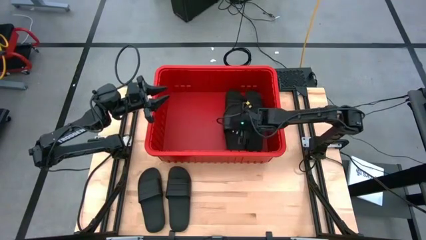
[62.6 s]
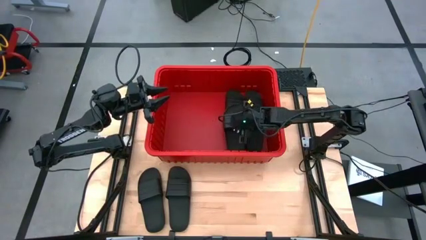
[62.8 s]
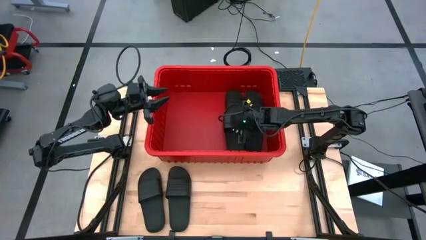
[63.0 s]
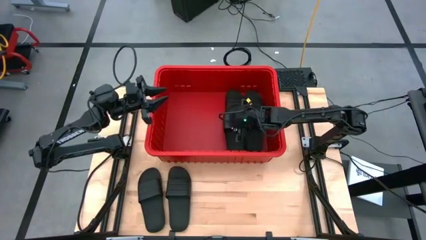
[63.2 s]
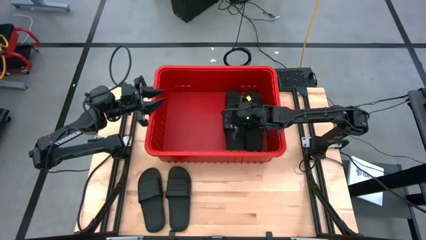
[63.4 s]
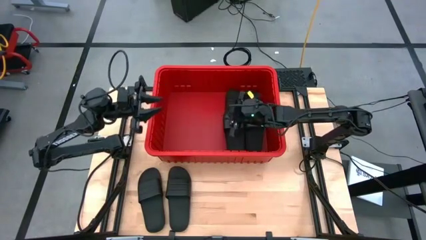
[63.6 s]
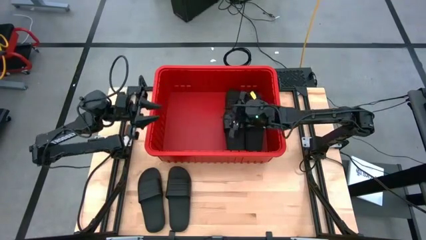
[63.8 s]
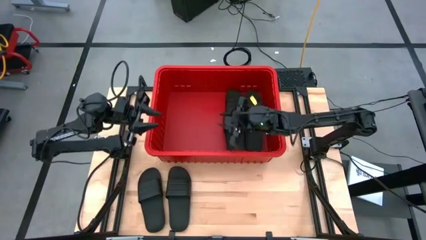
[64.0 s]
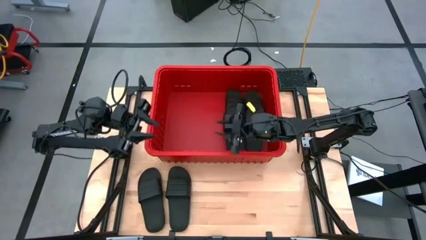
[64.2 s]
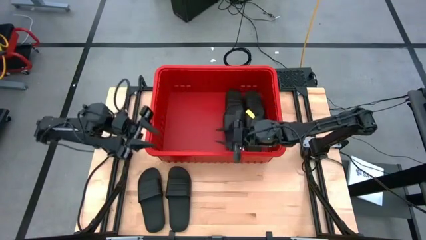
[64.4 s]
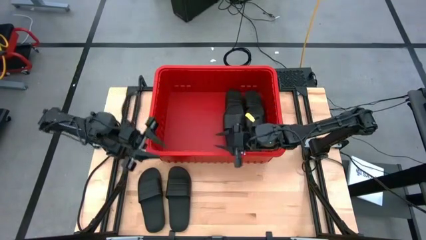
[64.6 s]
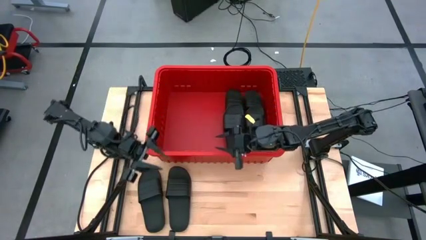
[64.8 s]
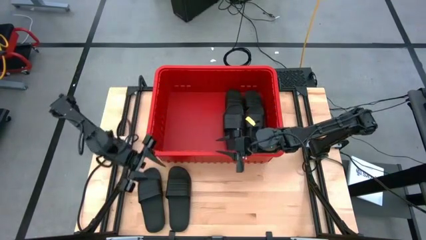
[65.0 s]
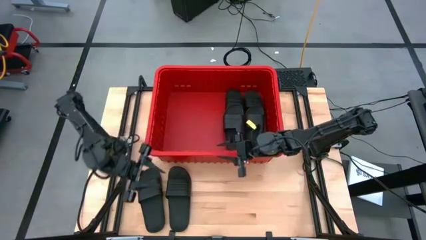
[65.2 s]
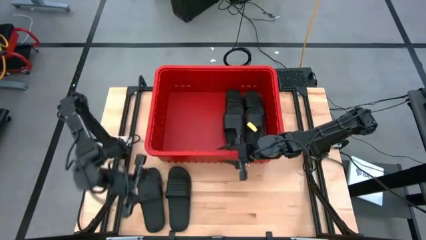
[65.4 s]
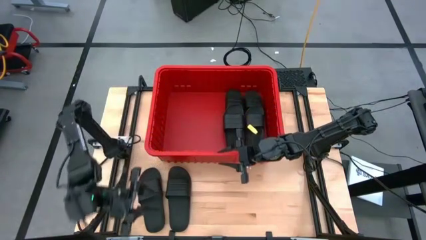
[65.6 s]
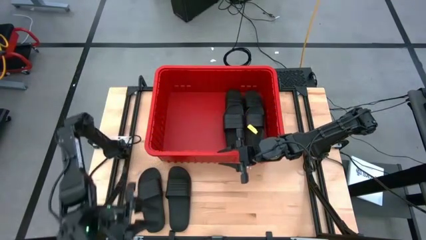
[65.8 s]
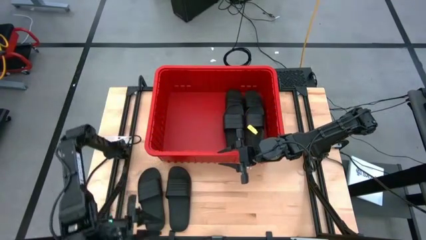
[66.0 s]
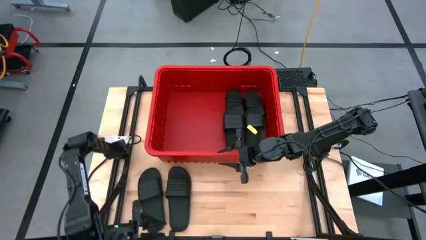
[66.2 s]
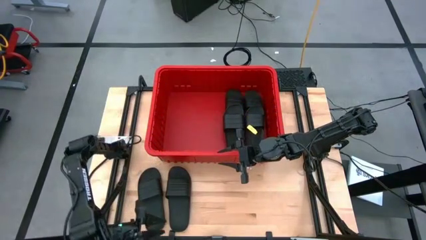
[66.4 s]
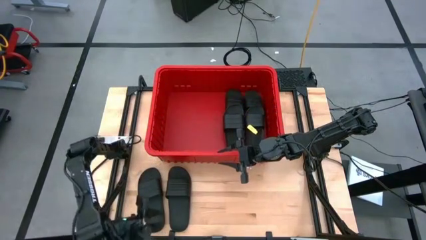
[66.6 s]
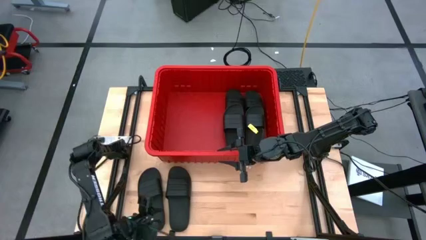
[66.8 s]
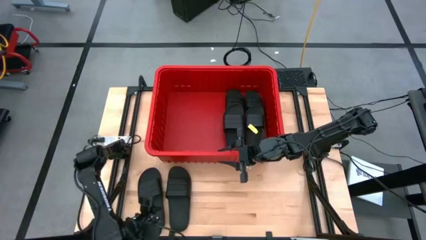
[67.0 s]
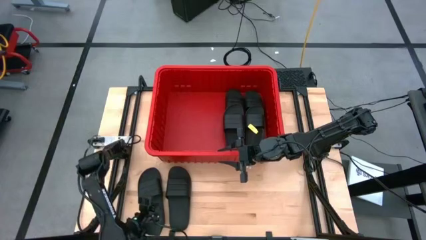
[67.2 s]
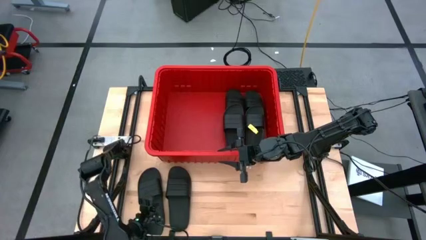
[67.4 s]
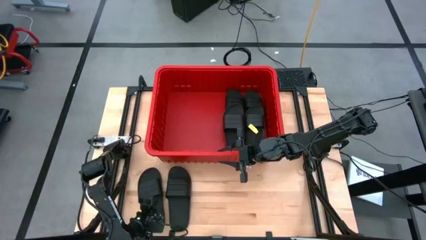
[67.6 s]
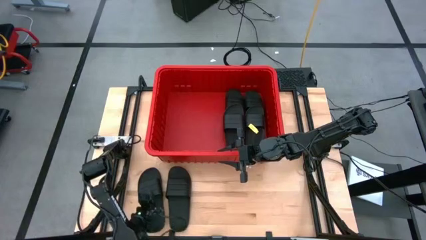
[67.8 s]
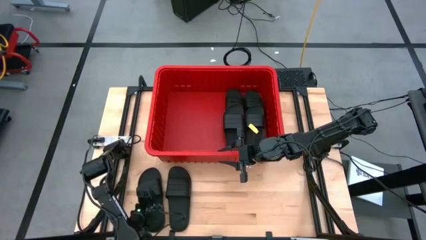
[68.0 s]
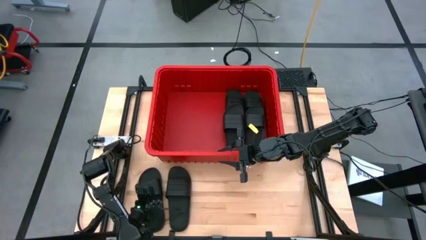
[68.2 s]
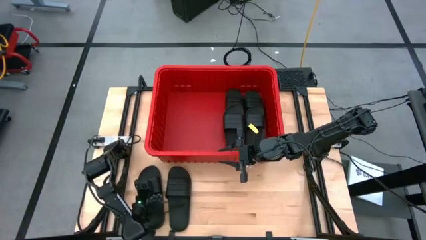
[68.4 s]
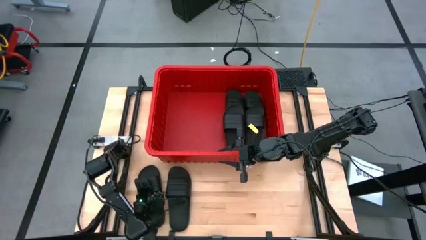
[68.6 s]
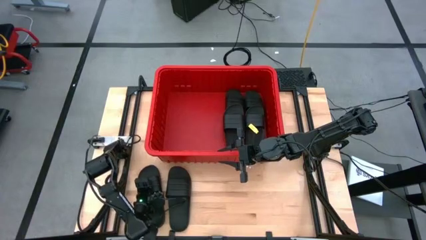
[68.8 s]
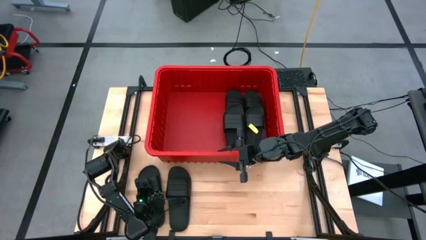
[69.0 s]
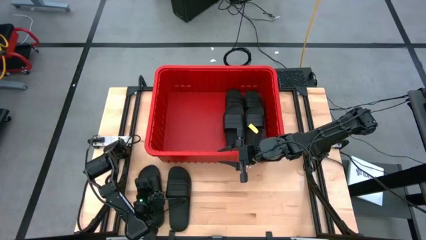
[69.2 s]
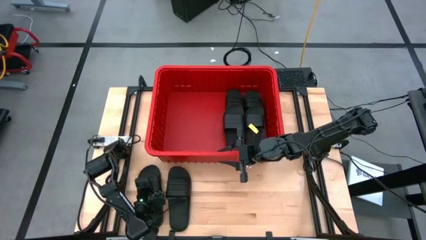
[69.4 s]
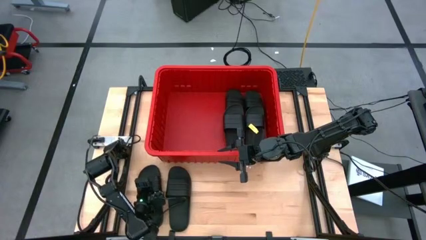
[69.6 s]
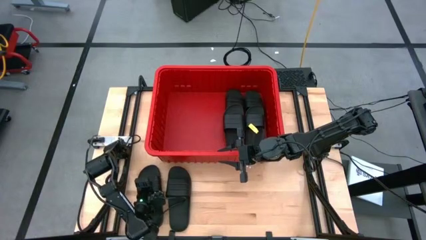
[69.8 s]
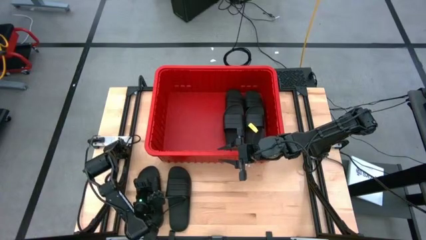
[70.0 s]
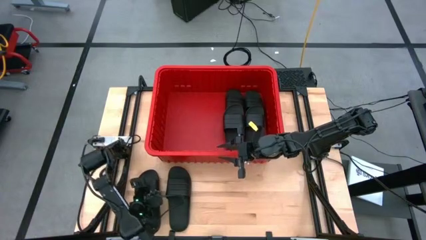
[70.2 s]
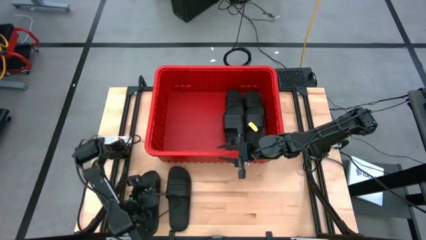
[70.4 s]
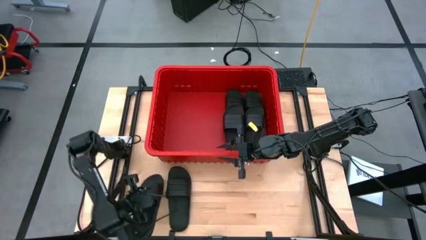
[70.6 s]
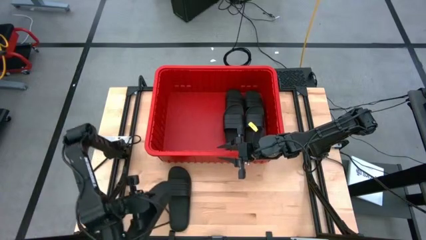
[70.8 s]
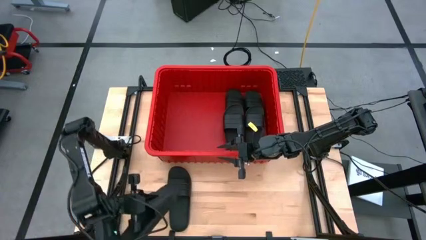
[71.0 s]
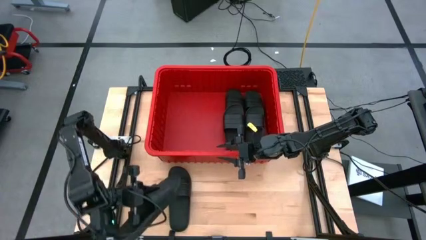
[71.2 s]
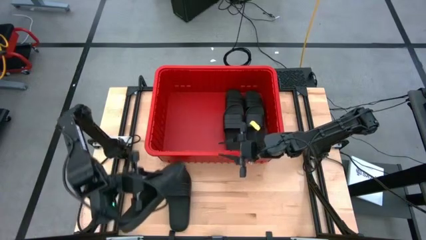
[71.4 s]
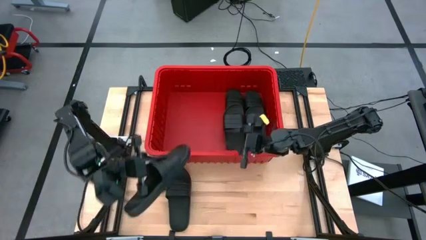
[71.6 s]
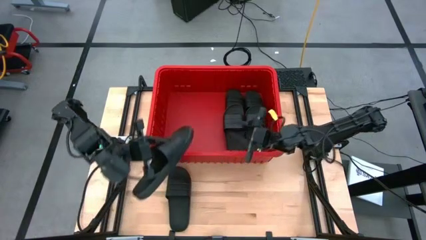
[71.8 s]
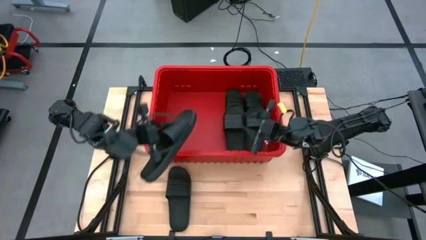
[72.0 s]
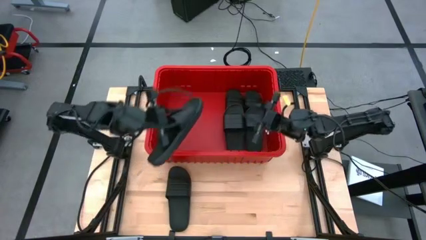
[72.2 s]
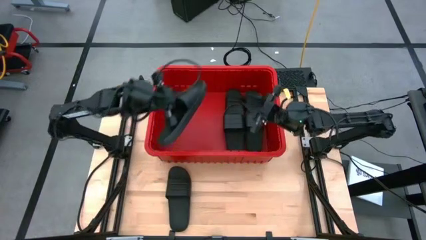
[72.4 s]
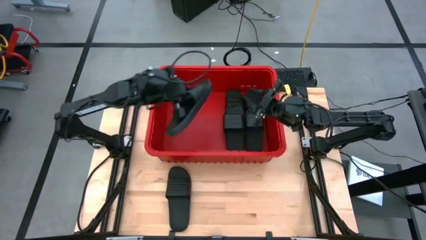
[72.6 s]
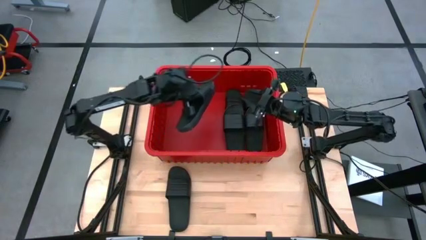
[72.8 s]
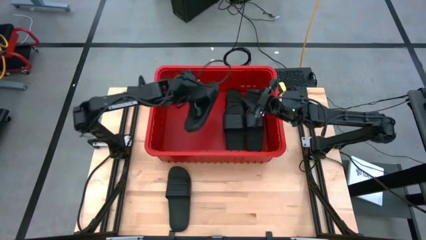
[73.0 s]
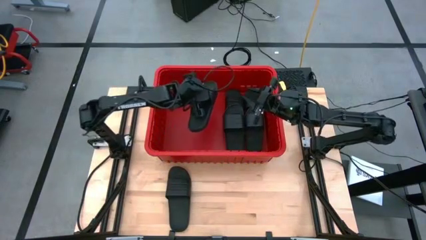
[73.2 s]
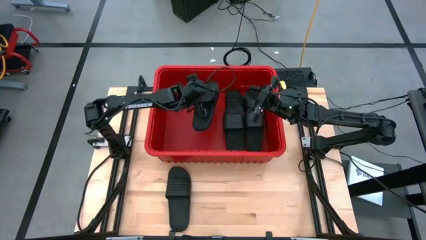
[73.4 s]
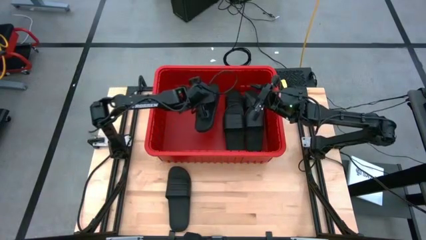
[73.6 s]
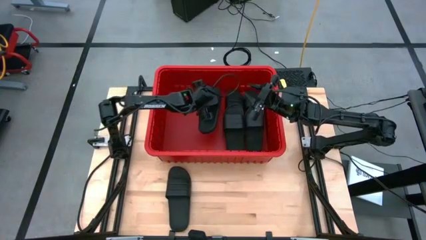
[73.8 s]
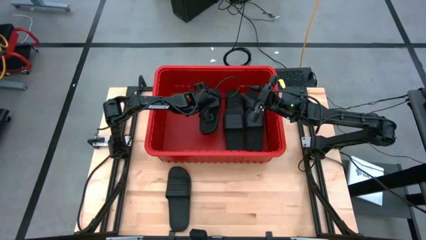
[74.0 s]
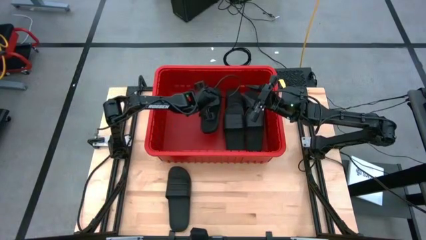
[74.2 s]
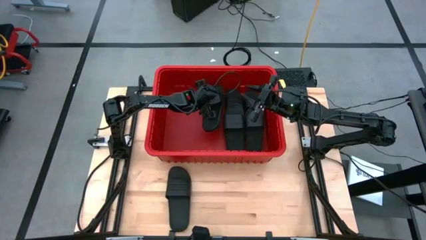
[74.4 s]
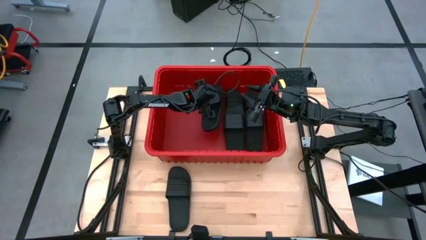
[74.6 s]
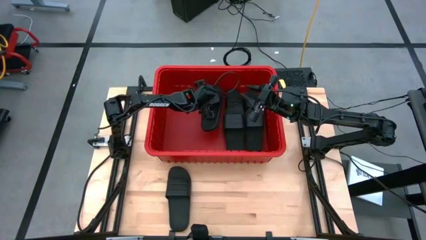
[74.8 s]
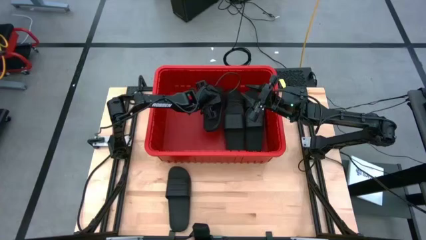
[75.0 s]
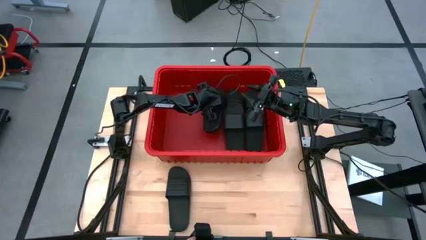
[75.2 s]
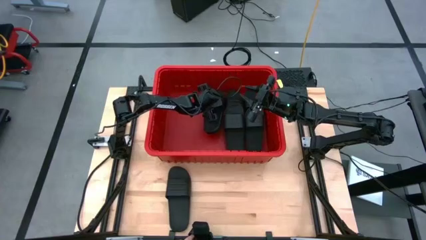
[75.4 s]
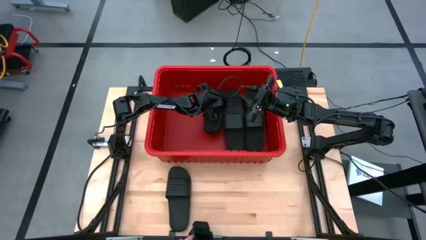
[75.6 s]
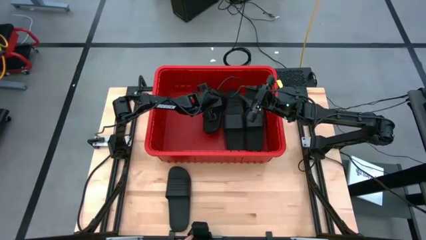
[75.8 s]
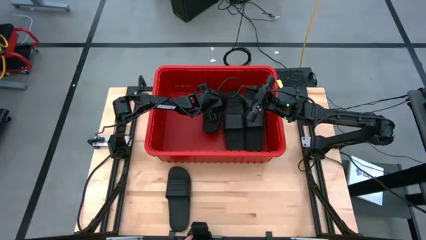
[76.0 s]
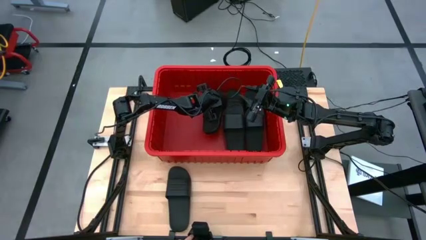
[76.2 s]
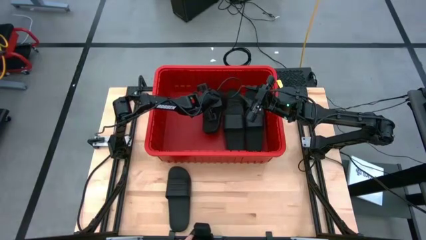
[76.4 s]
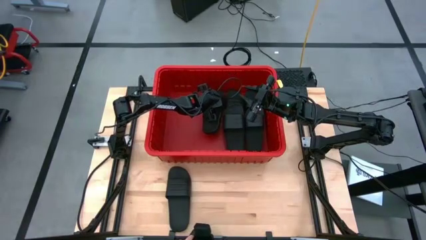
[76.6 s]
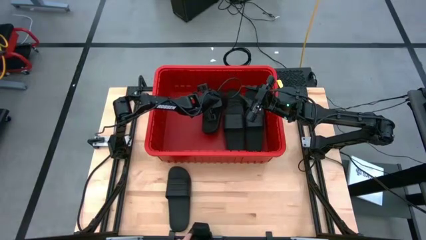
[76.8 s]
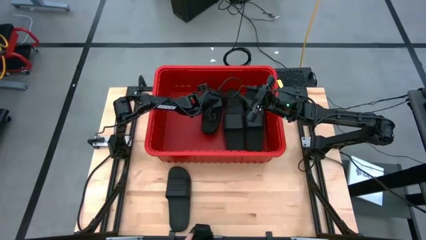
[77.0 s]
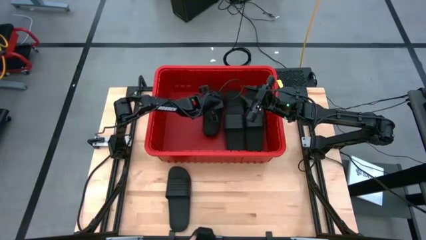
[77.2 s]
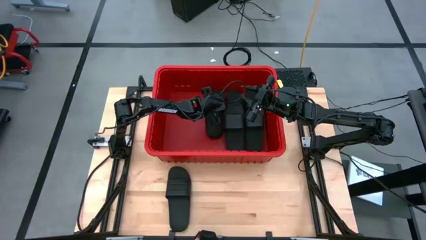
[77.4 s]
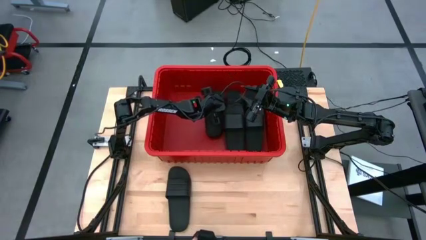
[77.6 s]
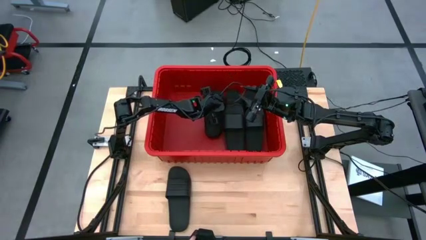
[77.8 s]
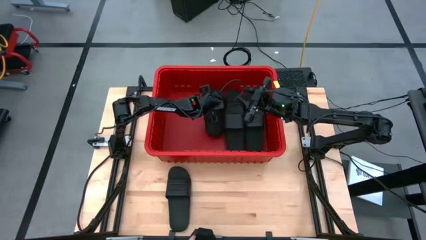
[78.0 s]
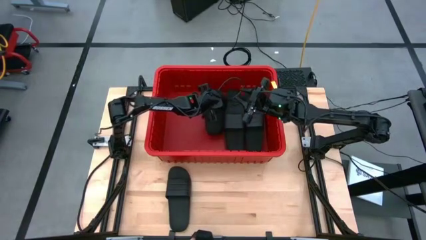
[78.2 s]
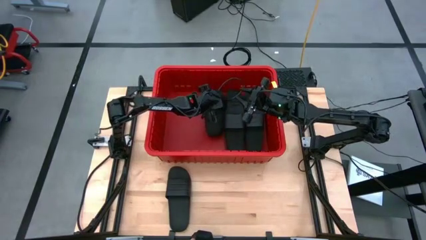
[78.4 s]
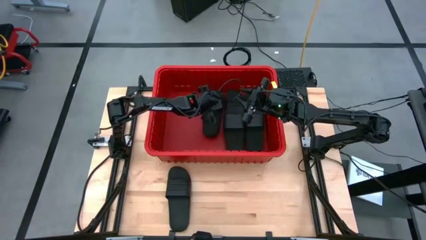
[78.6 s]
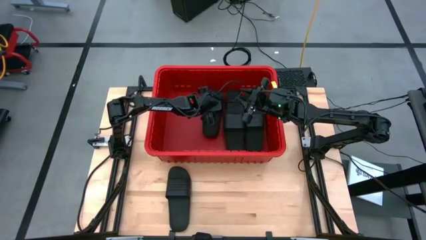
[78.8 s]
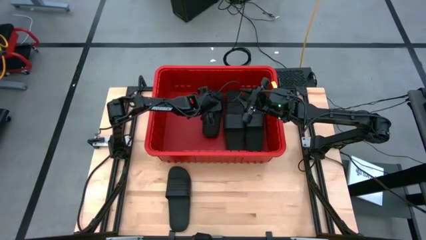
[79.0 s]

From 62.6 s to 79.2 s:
Task: Pick and place slides into bin
Put the black slide into the red bin

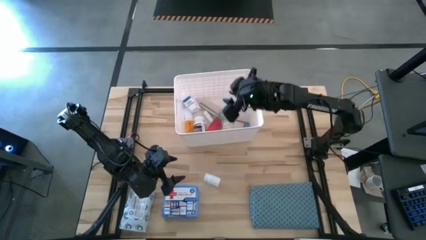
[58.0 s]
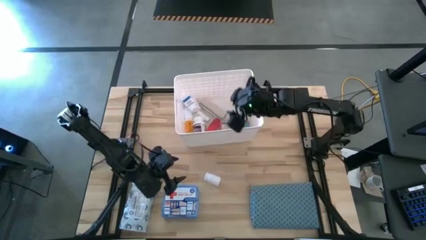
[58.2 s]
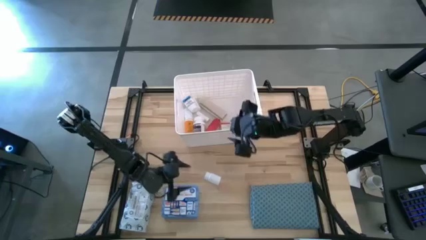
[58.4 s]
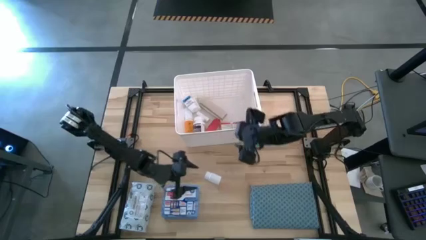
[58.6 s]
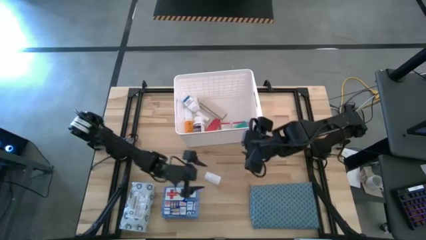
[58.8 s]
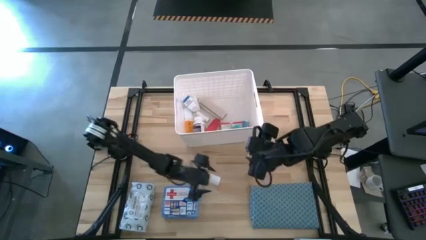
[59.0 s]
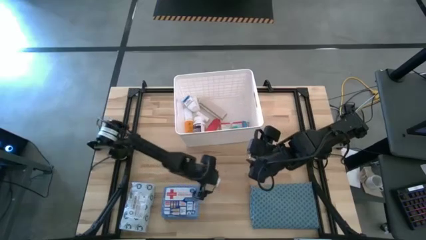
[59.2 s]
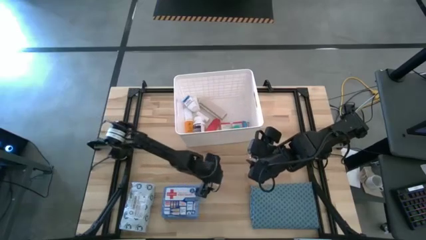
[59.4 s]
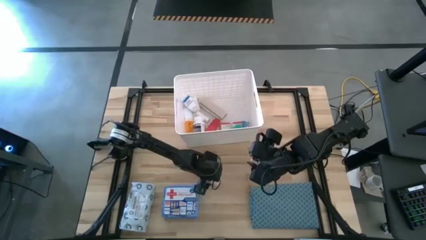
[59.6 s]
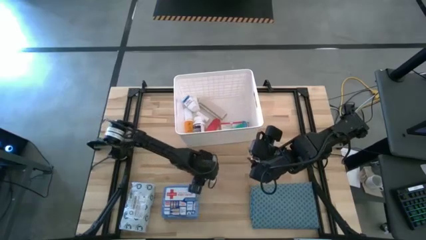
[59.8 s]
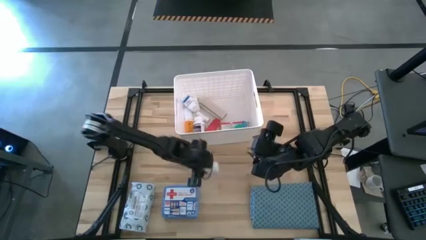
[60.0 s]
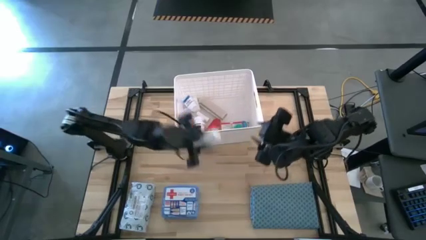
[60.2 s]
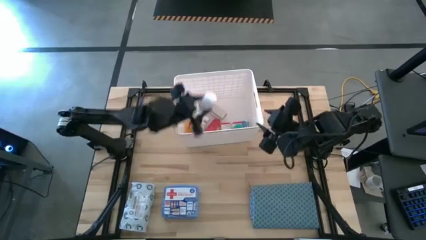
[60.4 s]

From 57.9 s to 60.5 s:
Task: Pick & place medical supplies in basket/bin
Put the white medicine bottle into the white bin
